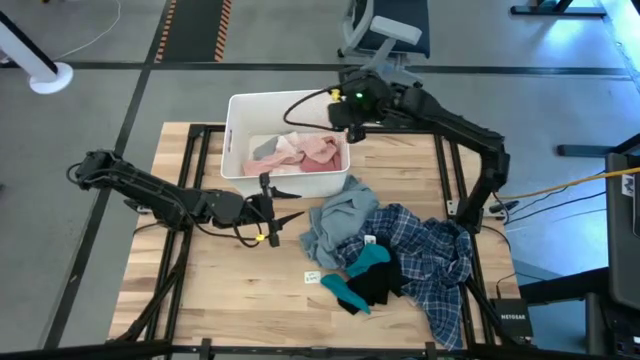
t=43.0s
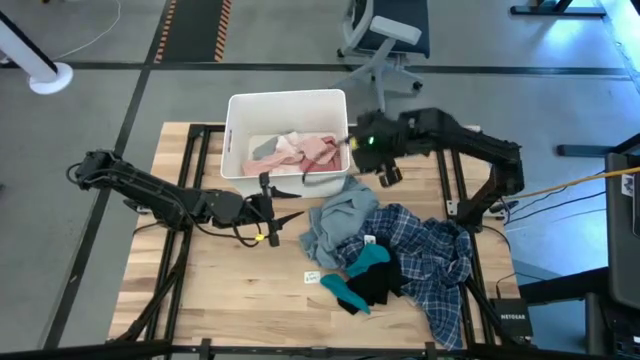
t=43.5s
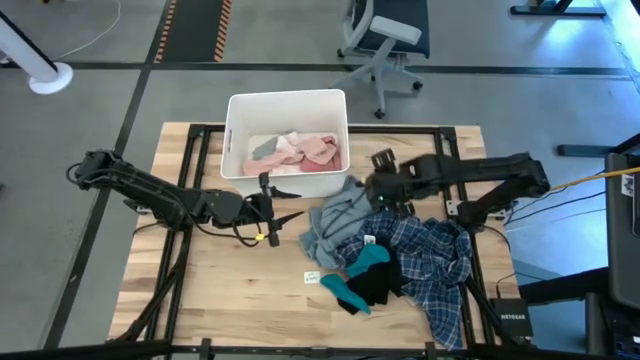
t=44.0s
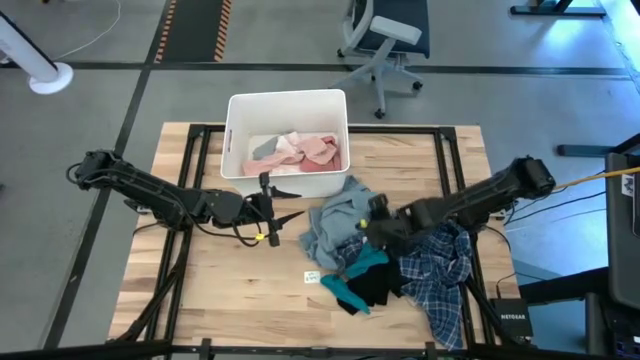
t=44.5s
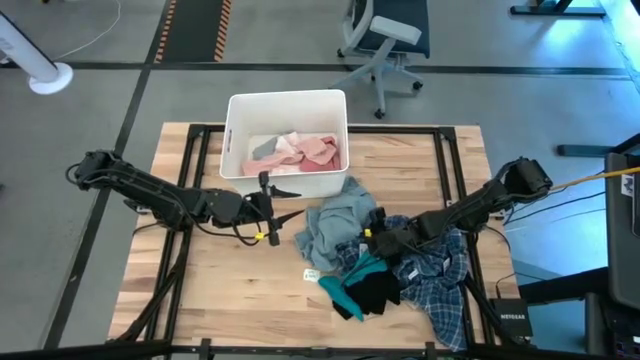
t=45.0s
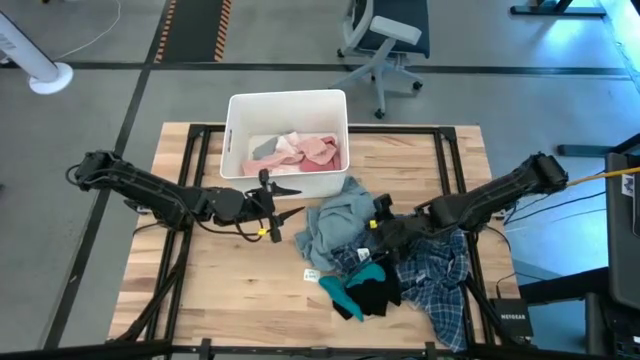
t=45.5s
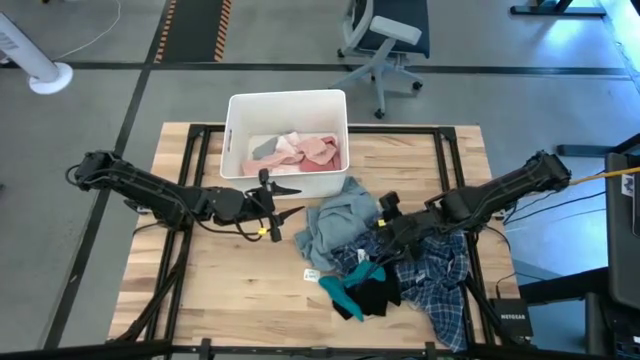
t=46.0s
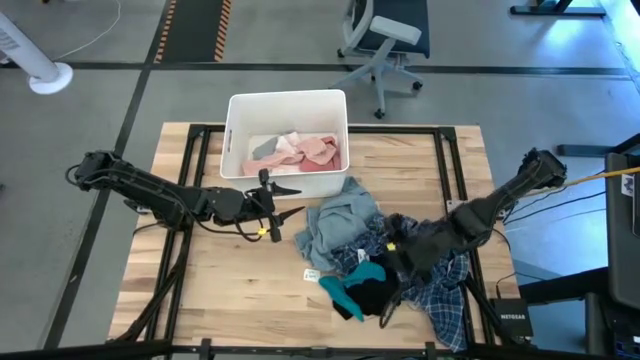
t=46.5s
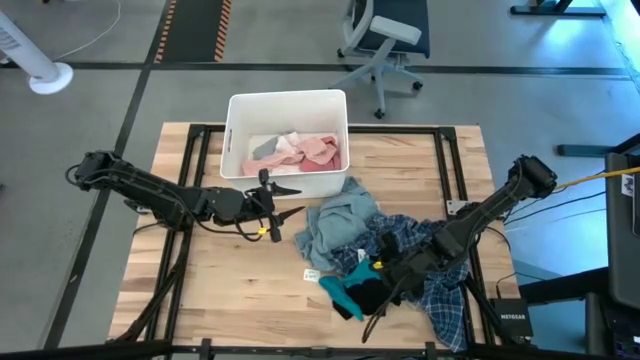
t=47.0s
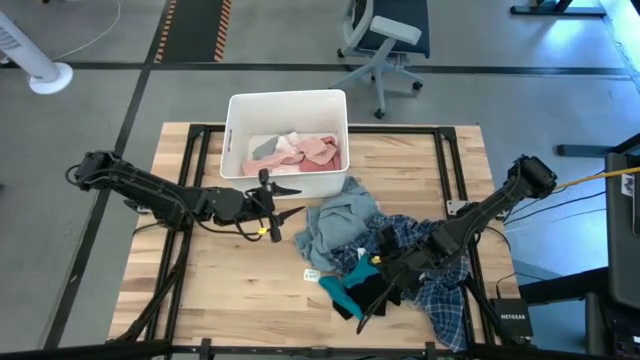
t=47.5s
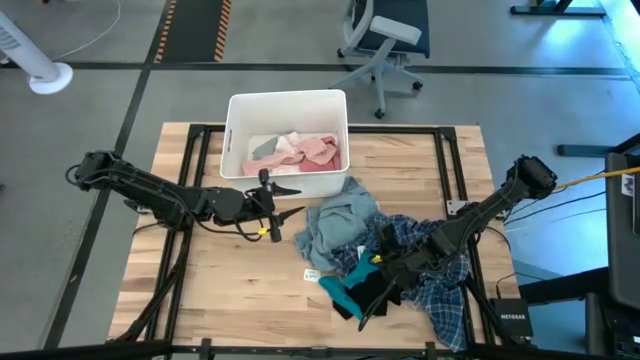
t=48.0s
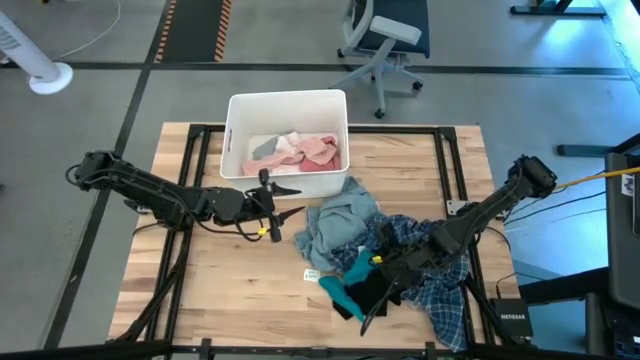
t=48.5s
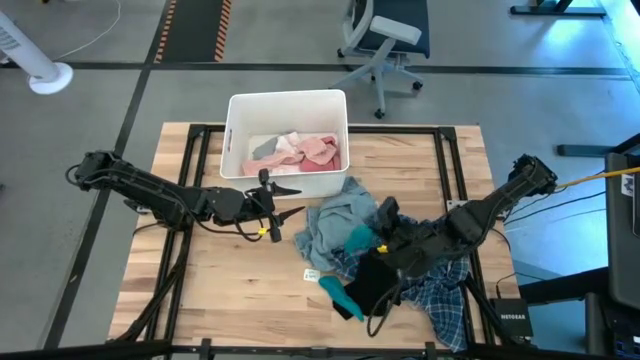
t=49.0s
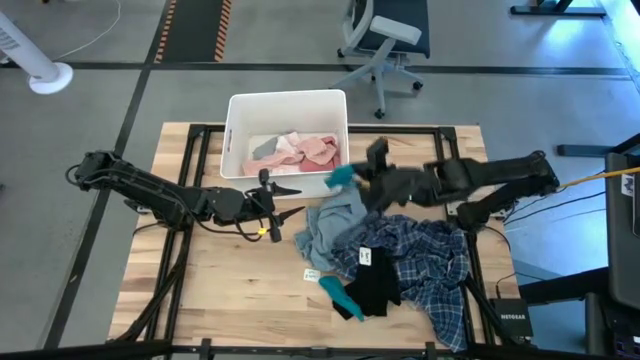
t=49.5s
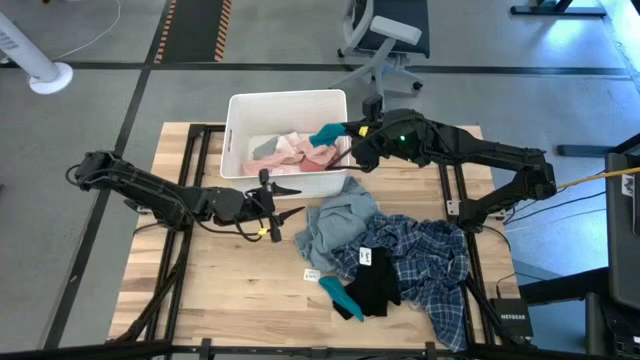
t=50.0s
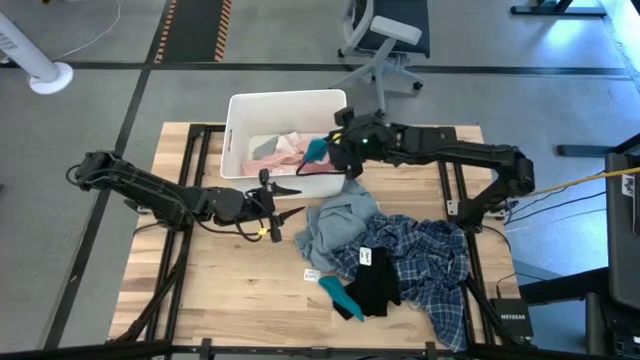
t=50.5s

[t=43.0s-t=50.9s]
Task: Sort clothes
Put the right blue sock into the white bin

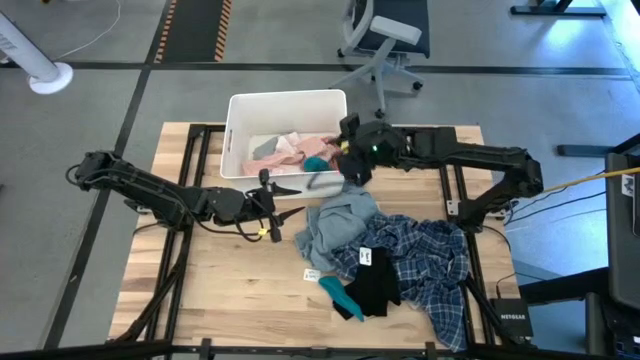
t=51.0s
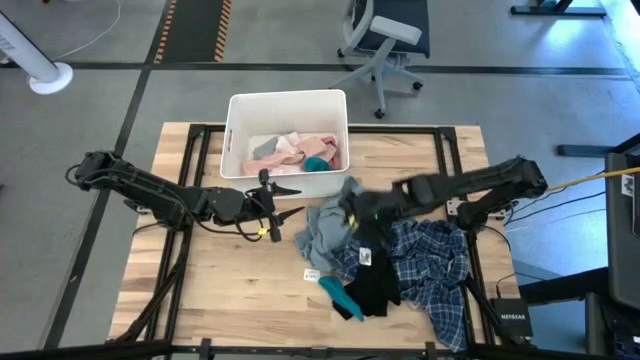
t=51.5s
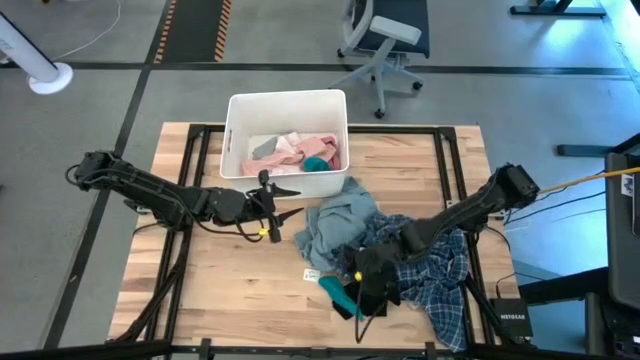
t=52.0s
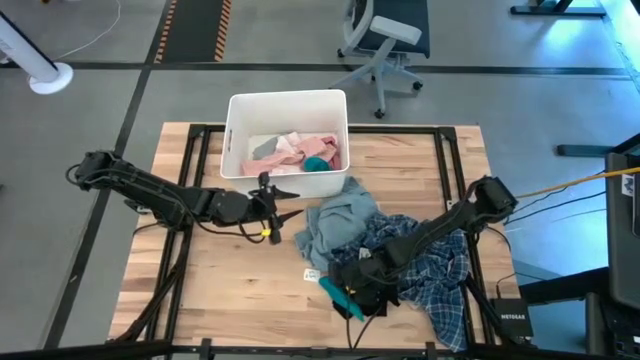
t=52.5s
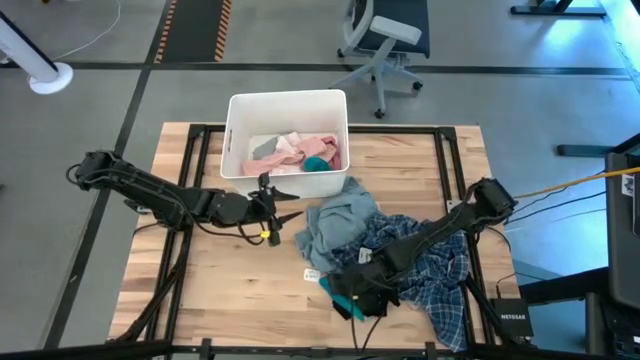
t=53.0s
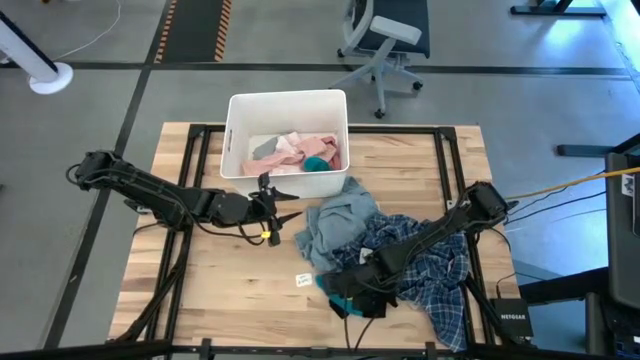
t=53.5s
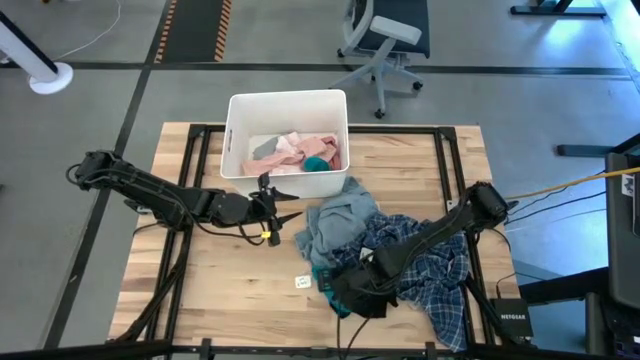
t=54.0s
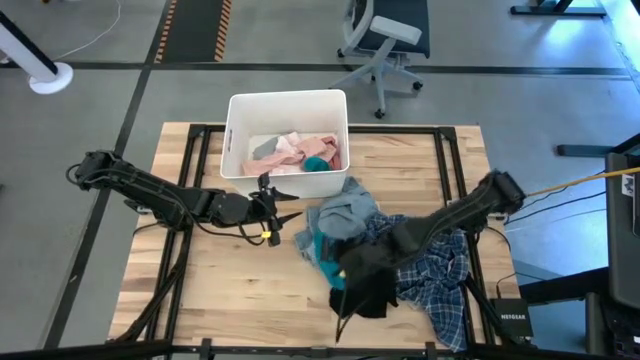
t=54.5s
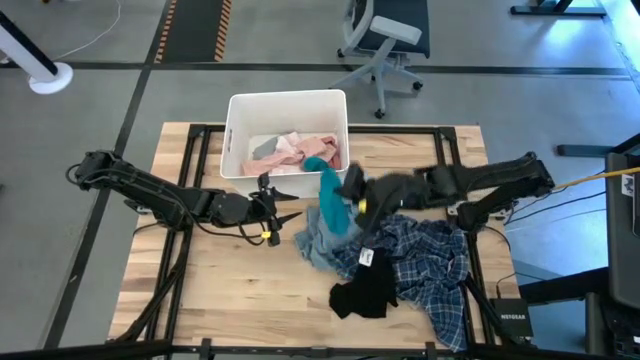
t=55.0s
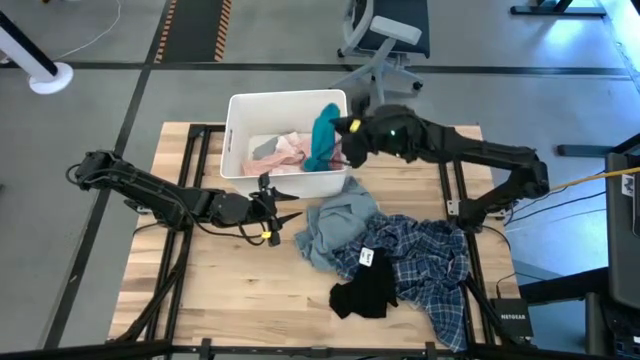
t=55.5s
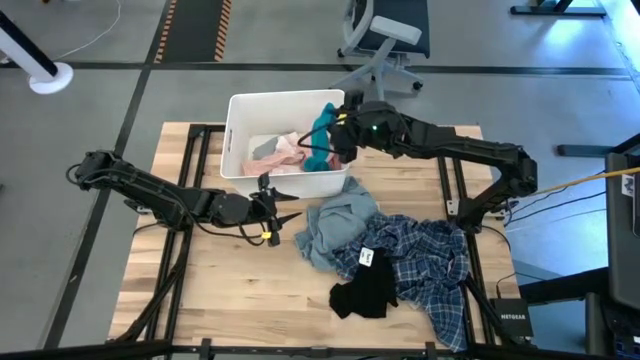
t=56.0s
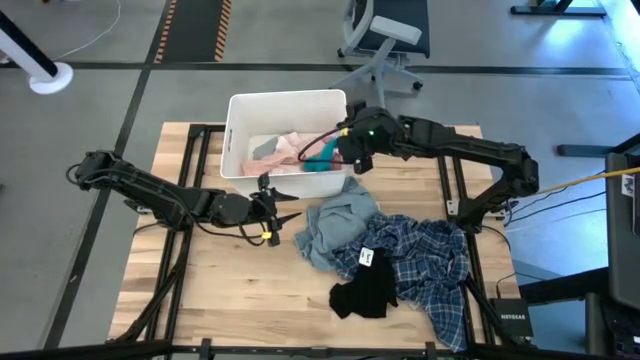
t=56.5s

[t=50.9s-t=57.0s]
Put the blue sock into the white bin

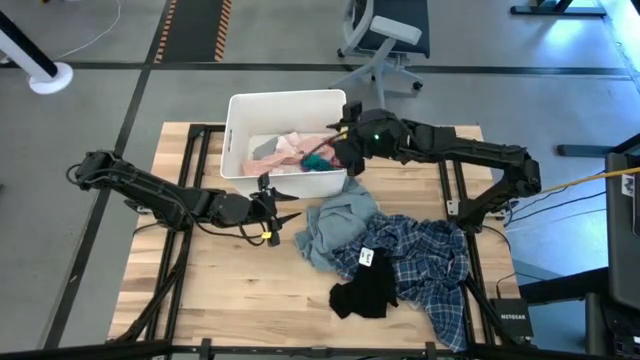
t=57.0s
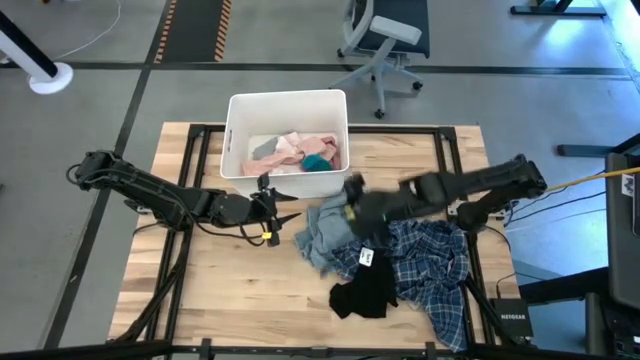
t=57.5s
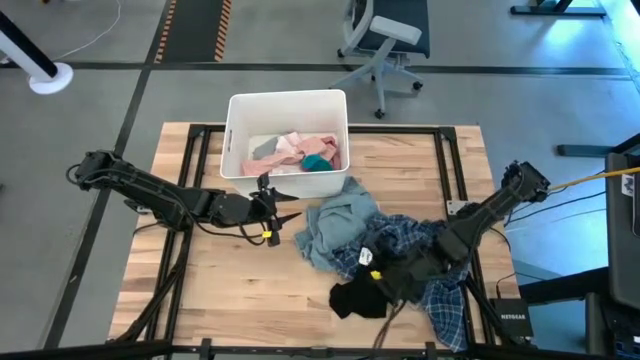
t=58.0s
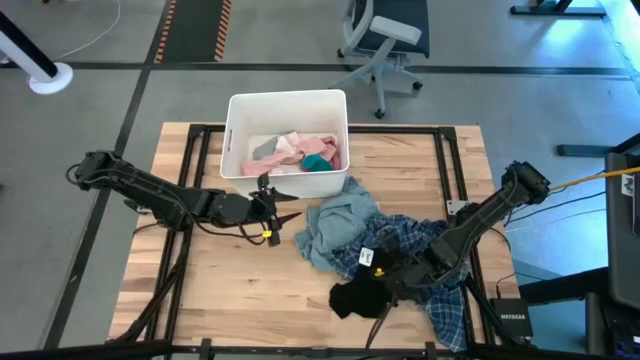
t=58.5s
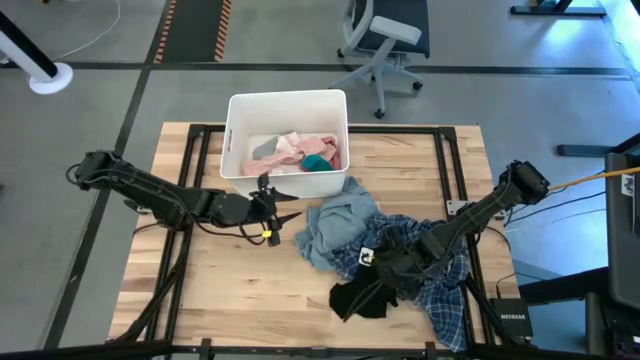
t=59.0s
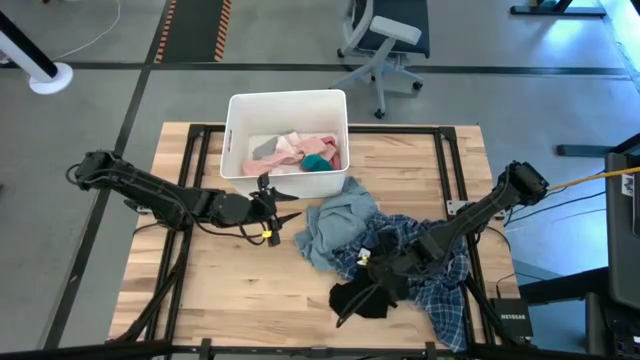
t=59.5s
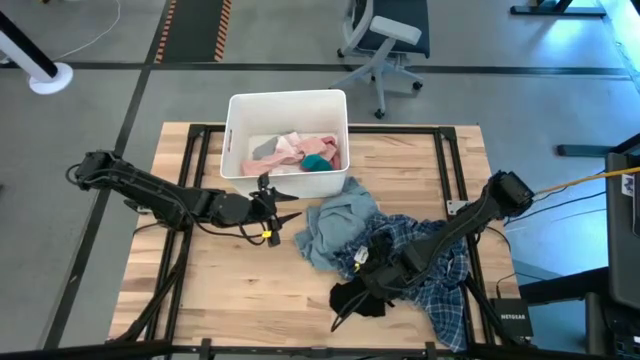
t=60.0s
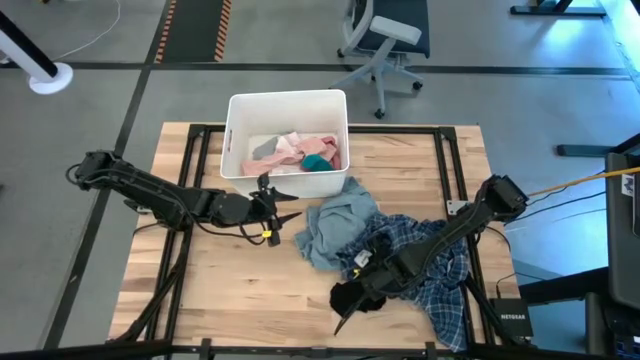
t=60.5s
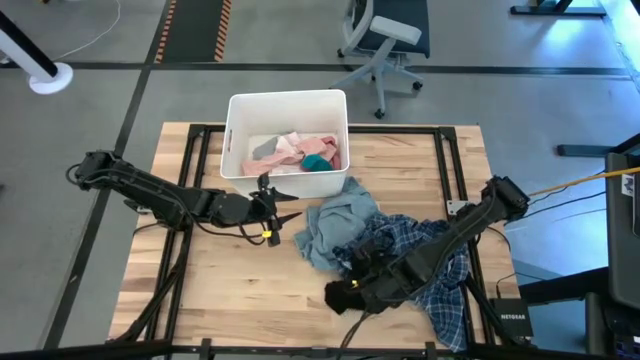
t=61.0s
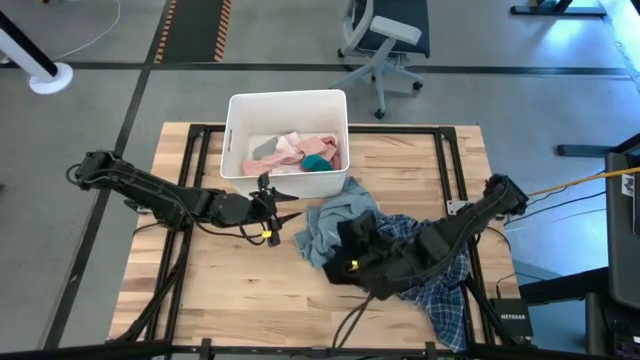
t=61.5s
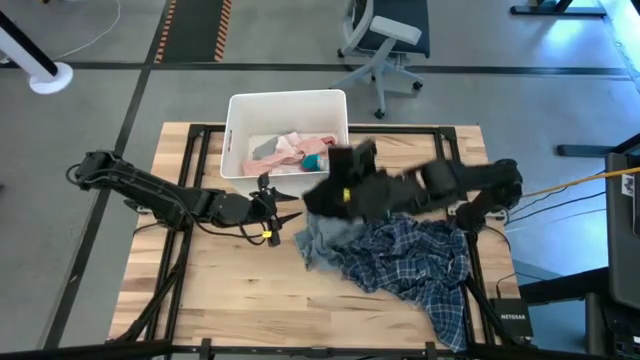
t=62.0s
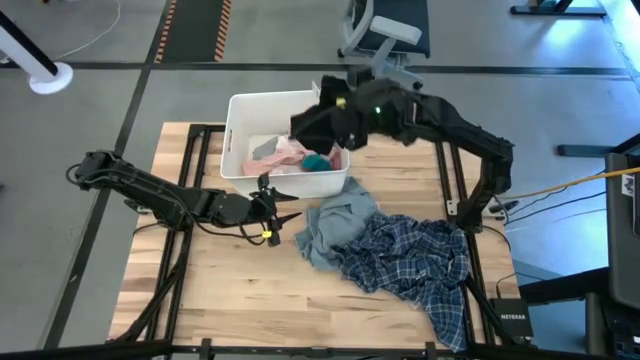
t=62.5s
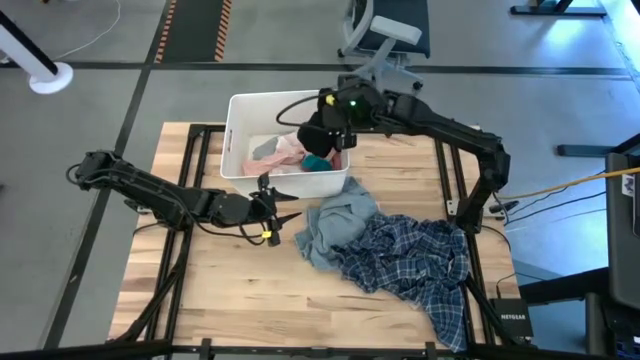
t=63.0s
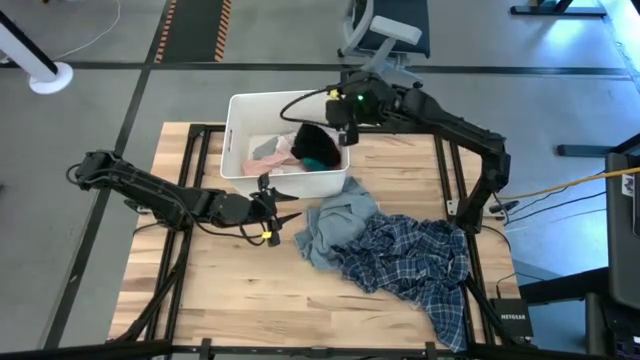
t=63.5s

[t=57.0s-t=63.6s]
Put the black pants into the white bin

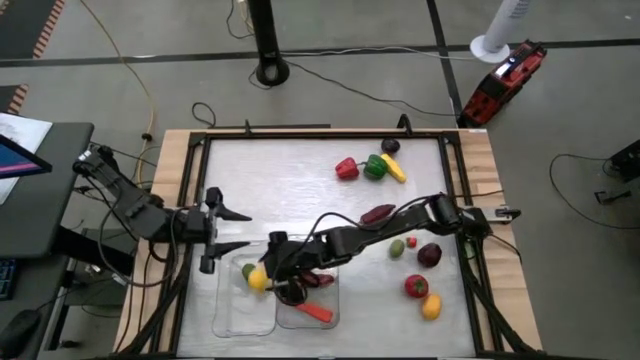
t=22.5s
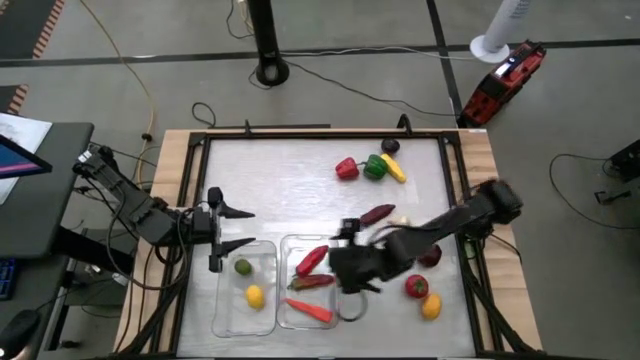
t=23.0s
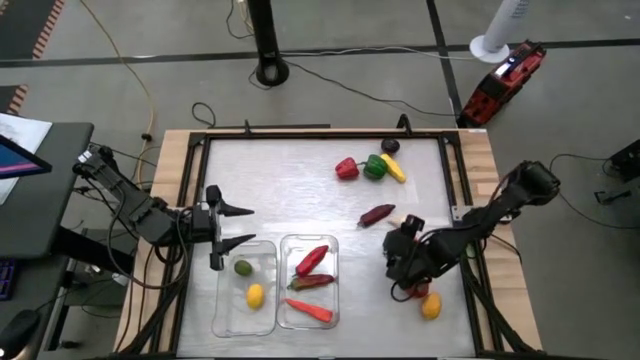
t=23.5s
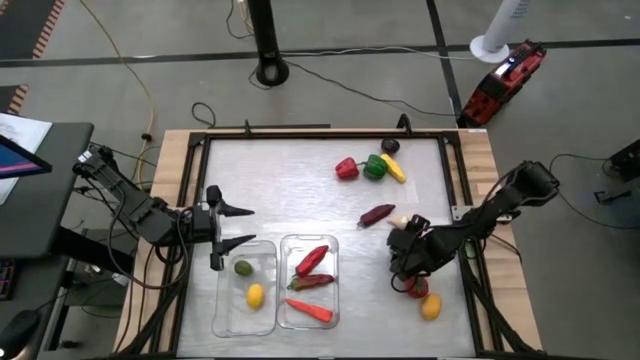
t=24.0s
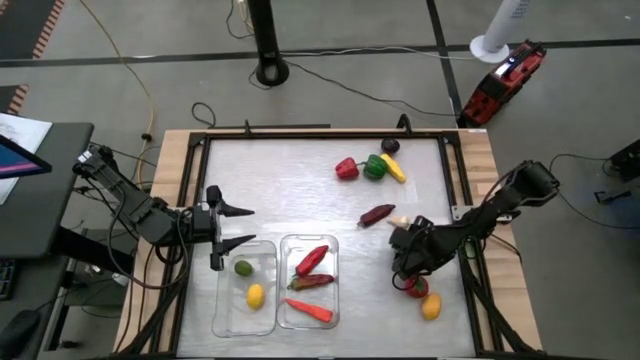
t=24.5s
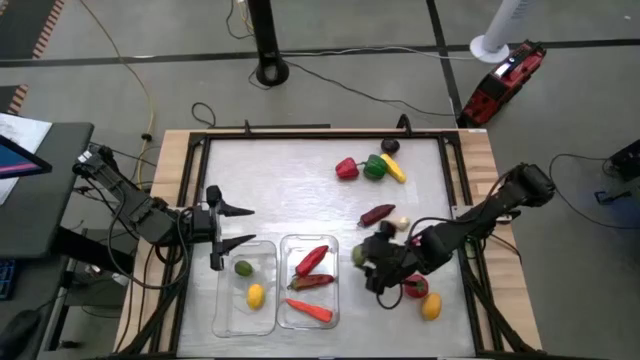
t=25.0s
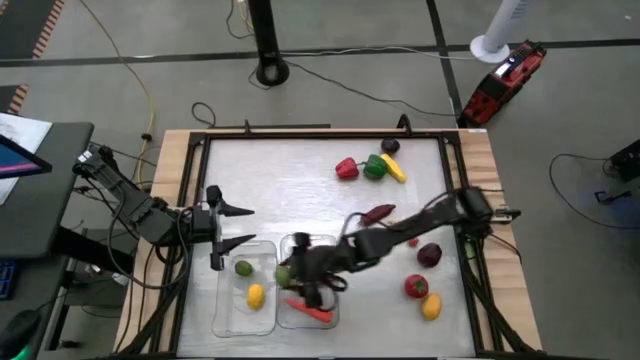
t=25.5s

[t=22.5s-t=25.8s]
Task: Sort produce into baskets
Put the green lime into the left transparent bin
